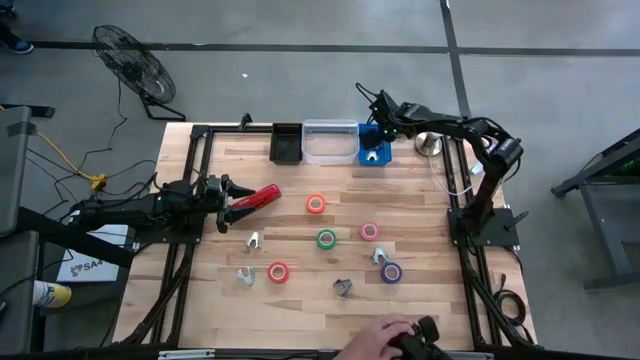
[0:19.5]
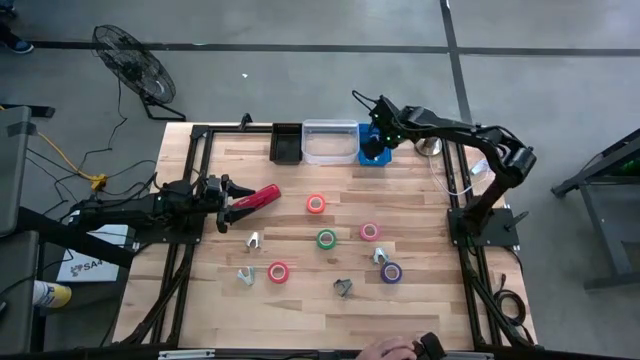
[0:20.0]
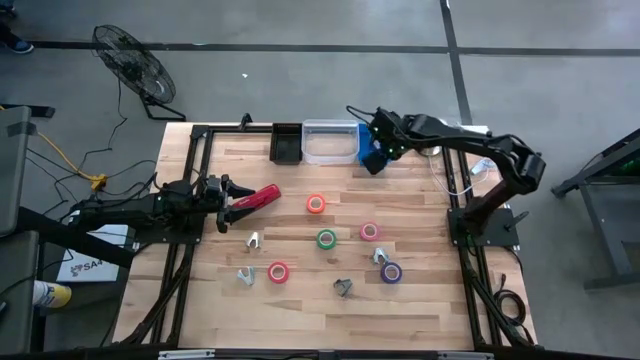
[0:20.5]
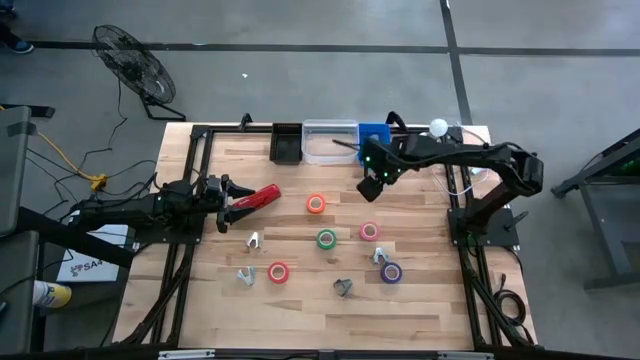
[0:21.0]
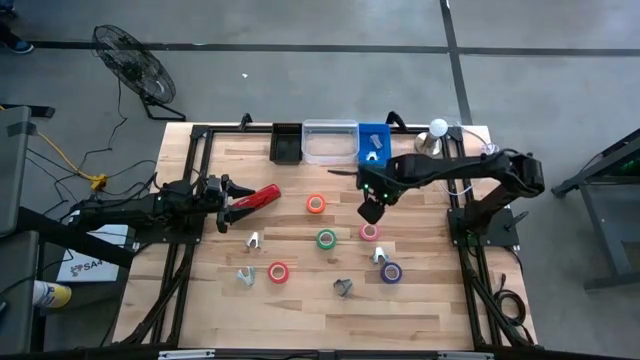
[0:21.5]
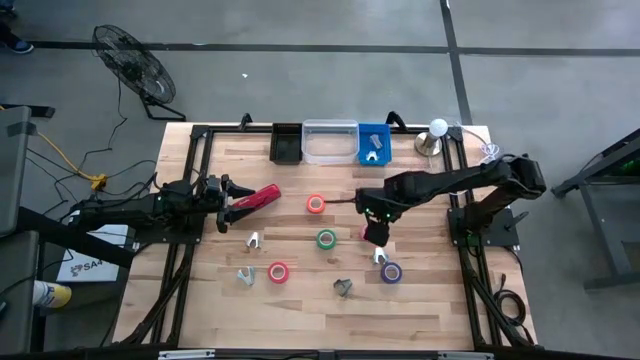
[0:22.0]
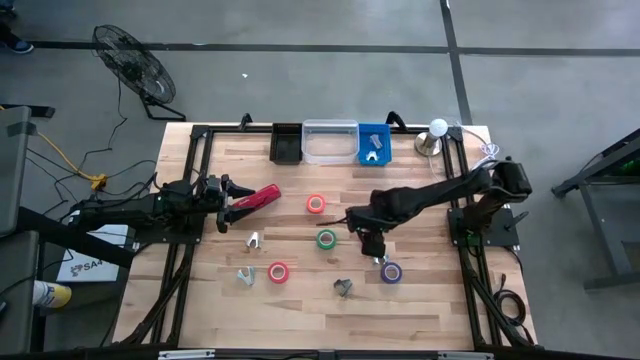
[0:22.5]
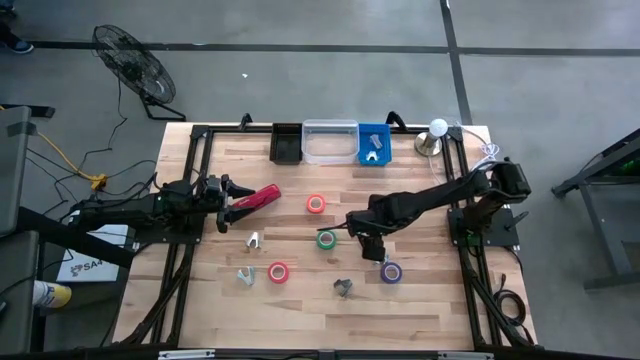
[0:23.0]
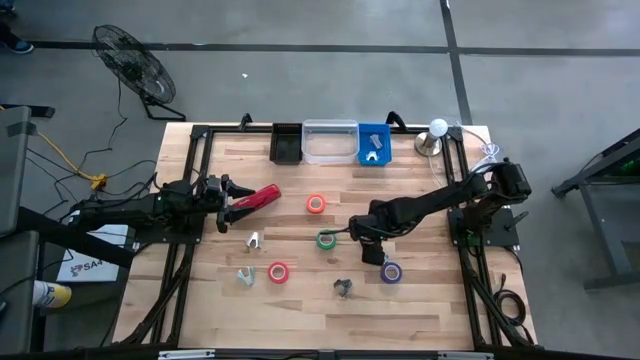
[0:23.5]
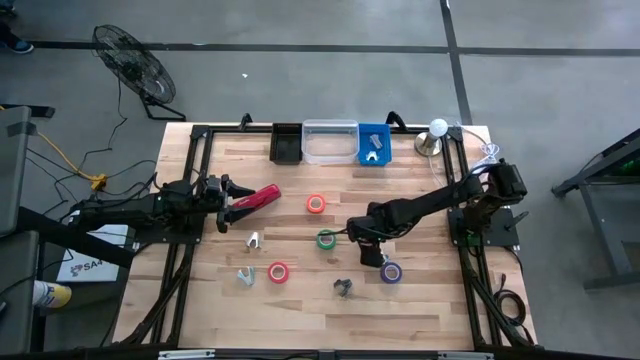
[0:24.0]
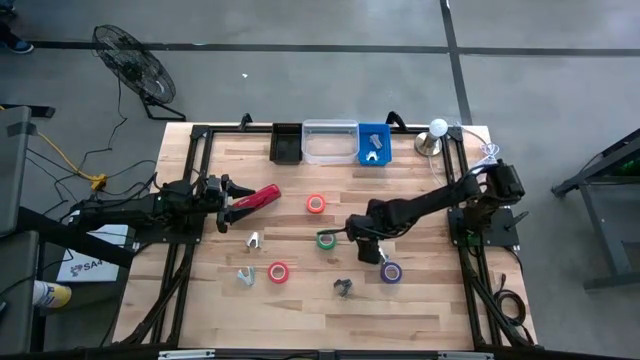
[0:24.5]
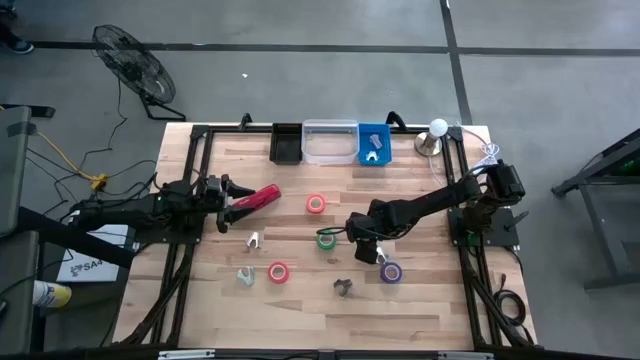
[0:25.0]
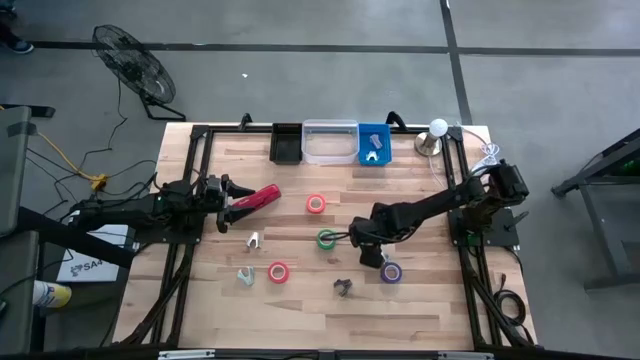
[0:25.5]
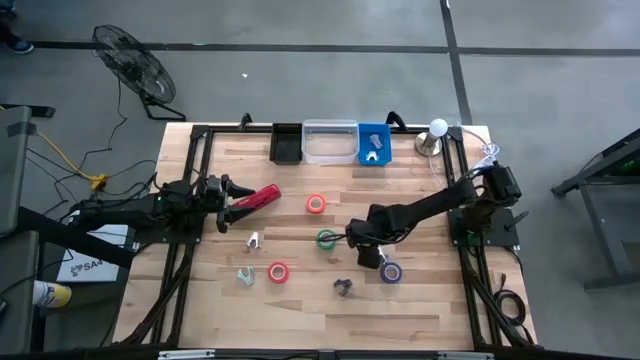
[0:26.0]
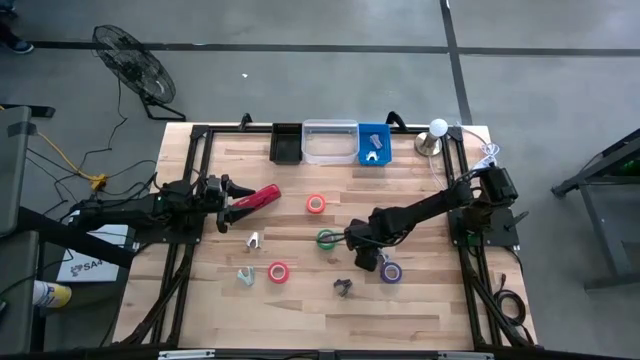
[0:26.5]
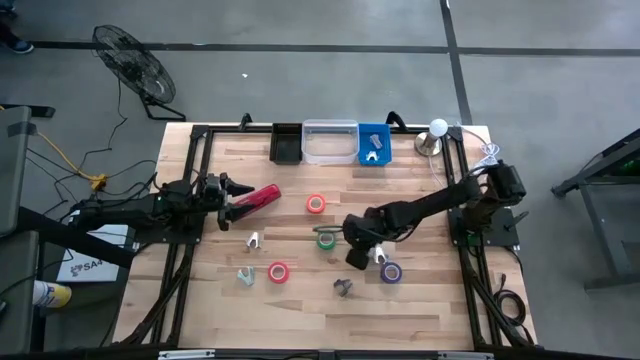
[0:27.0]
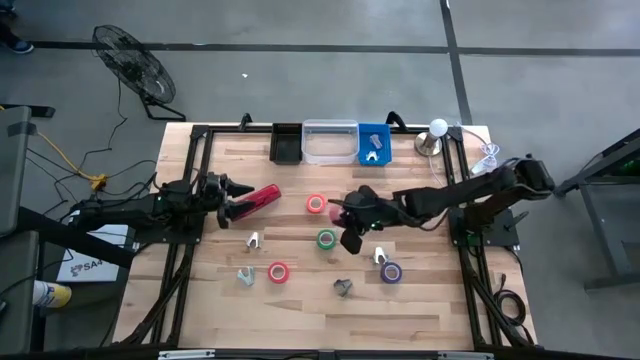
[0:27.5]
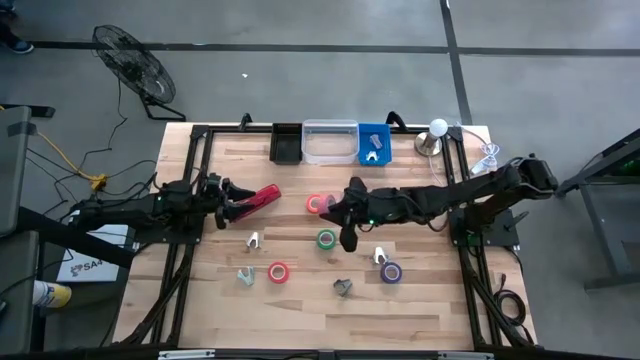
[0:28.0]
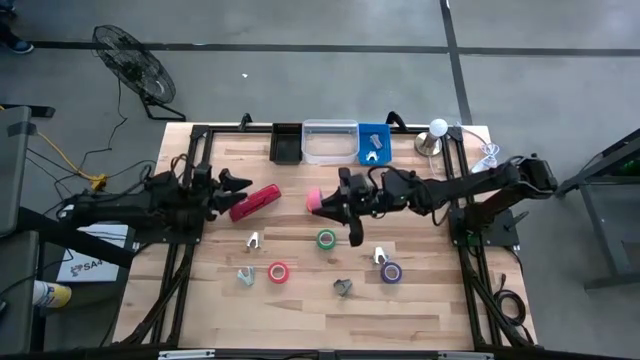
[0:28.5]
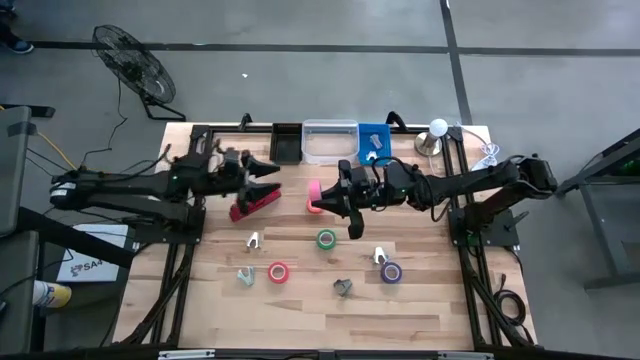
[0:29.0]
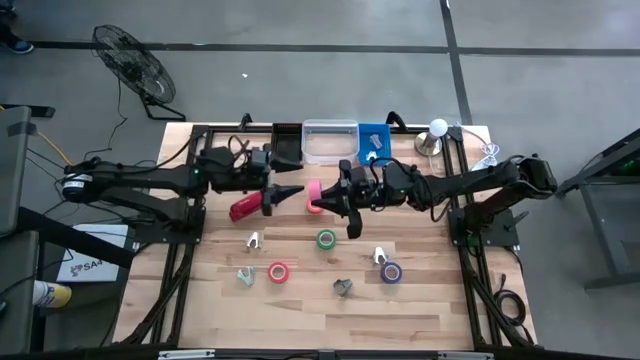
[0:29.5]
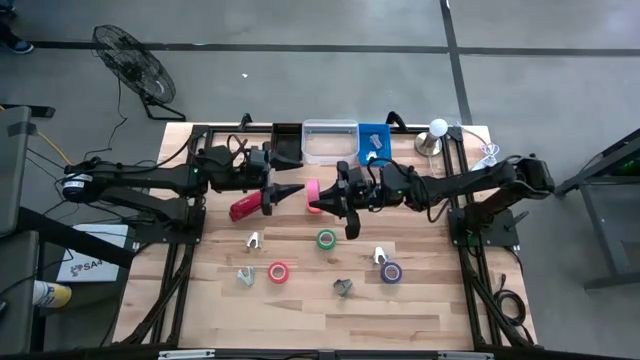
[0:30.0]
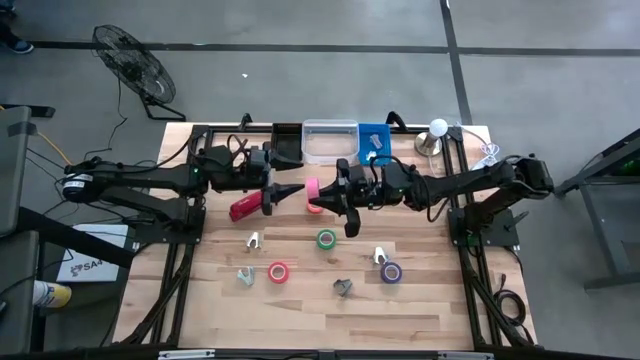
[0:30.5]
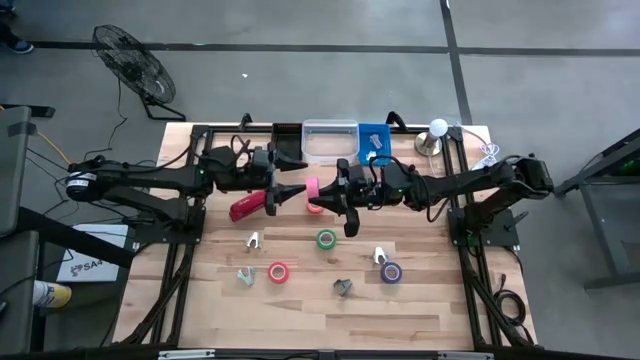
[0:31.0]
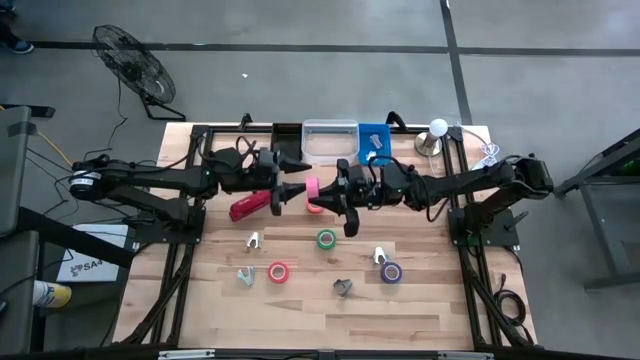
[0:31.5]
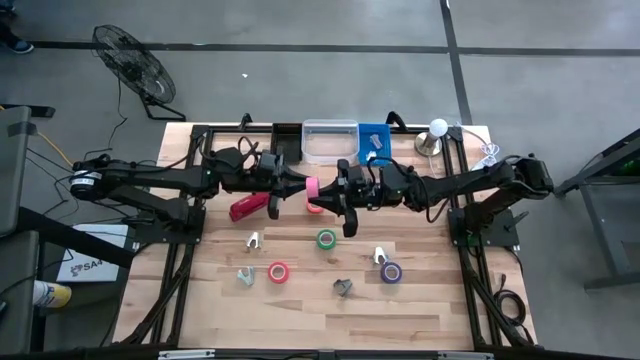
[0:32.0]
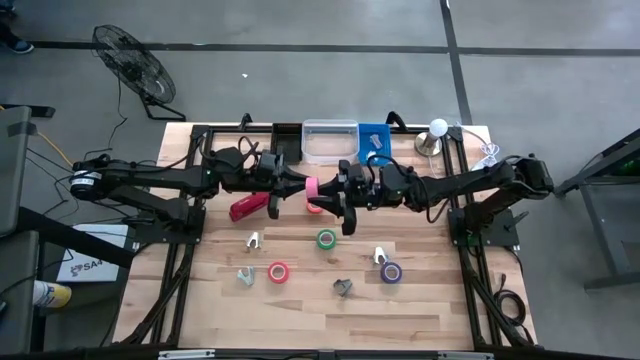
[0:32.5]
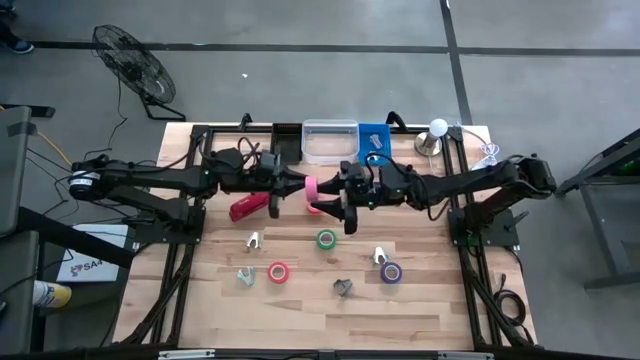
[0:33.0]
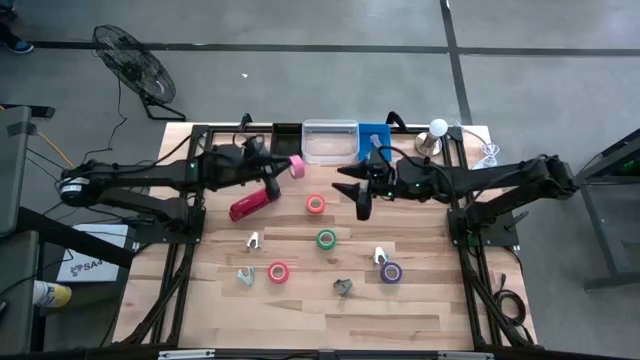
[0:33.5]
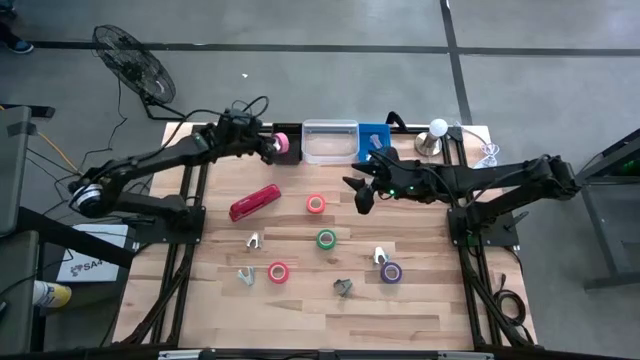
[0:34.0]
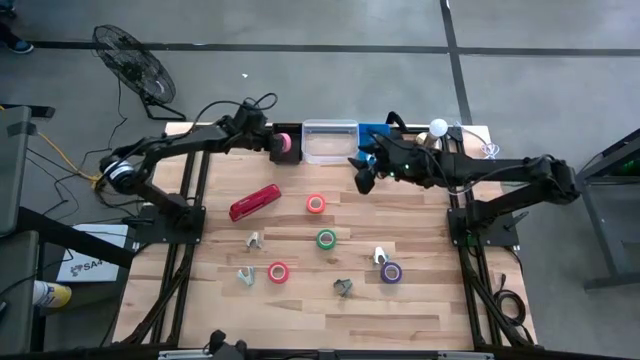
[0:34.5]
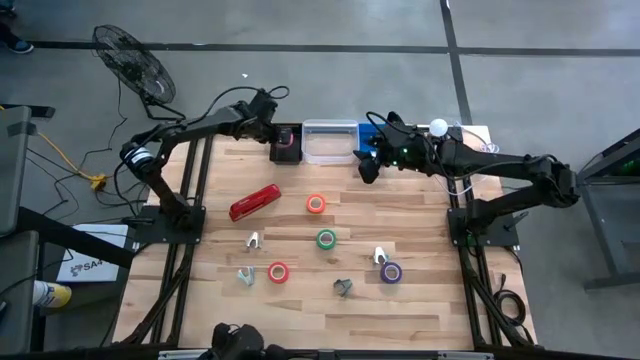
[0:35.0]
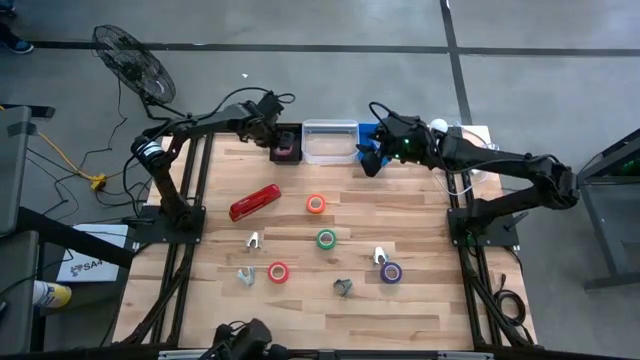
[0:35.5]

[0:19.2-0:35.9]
Task: Pick and place Stapler, Stapler remover, tape
Put the pink tape into the black bin

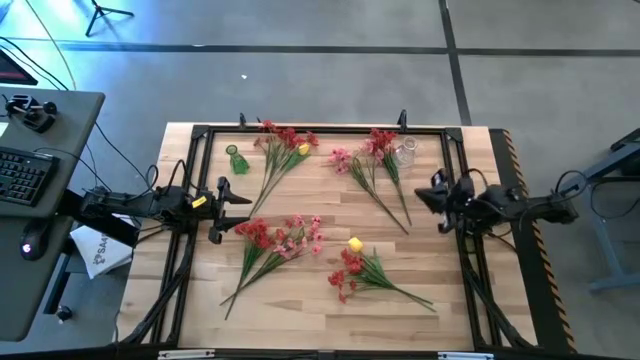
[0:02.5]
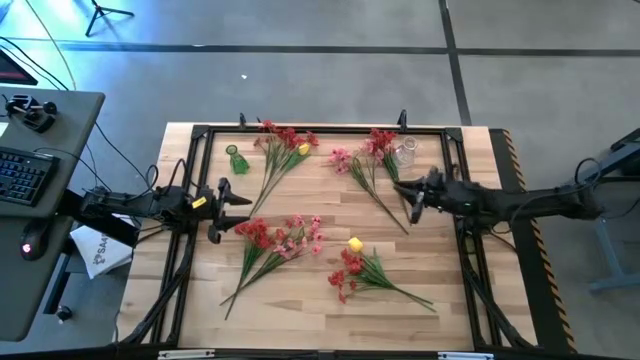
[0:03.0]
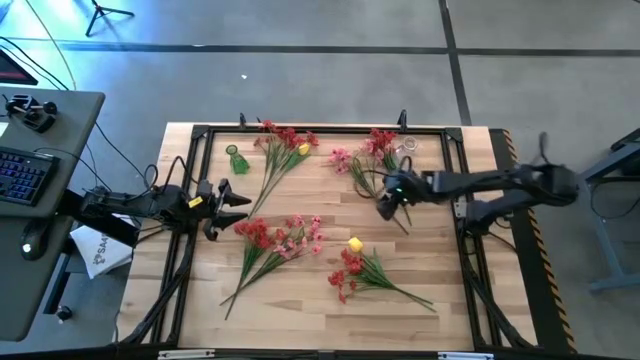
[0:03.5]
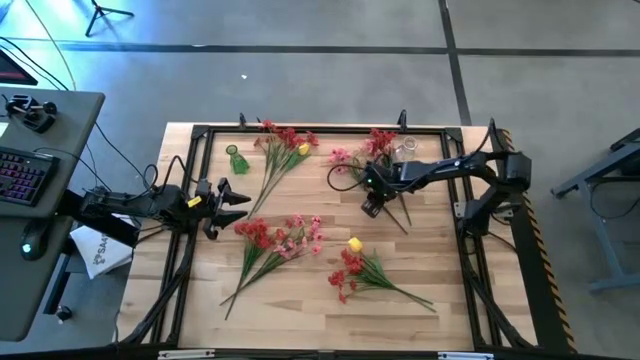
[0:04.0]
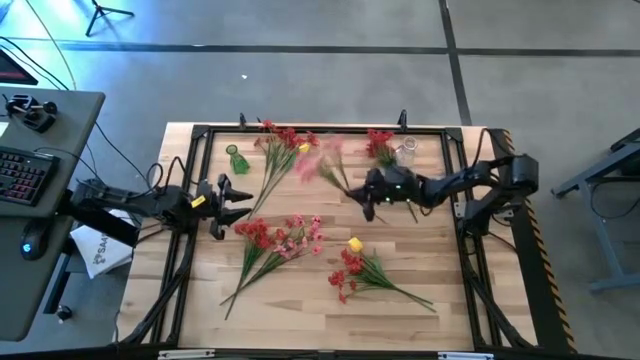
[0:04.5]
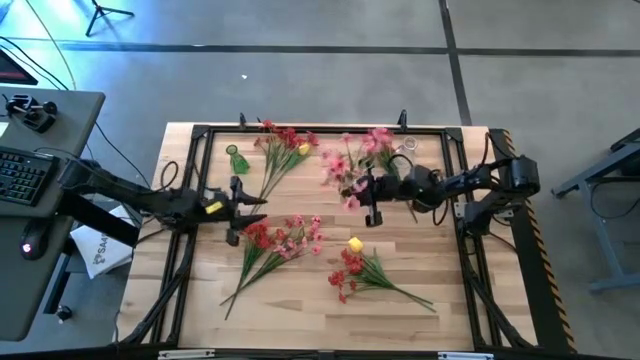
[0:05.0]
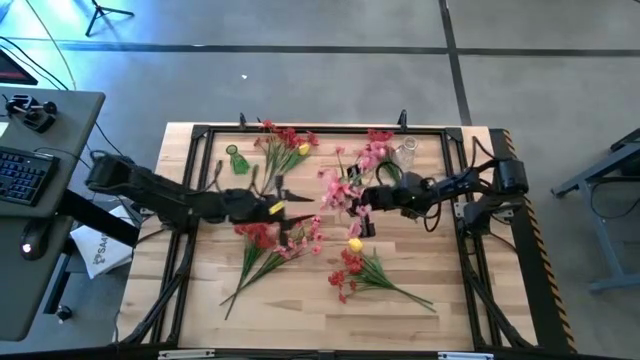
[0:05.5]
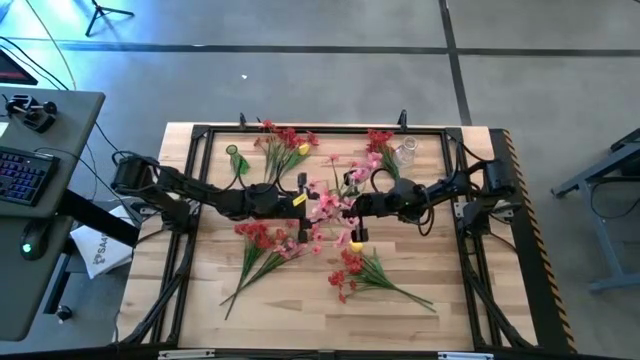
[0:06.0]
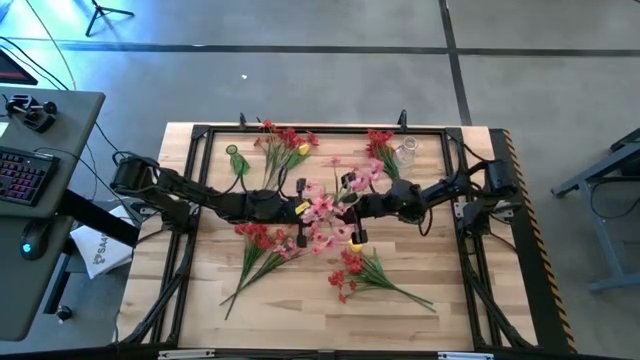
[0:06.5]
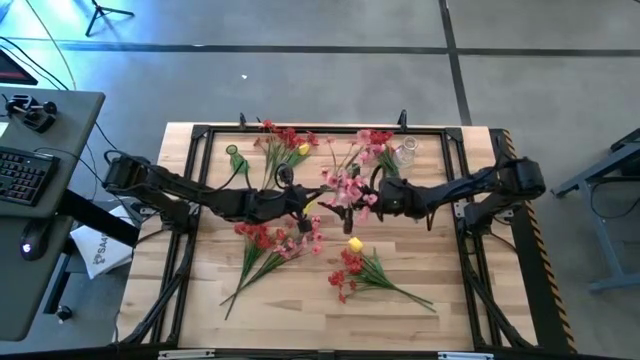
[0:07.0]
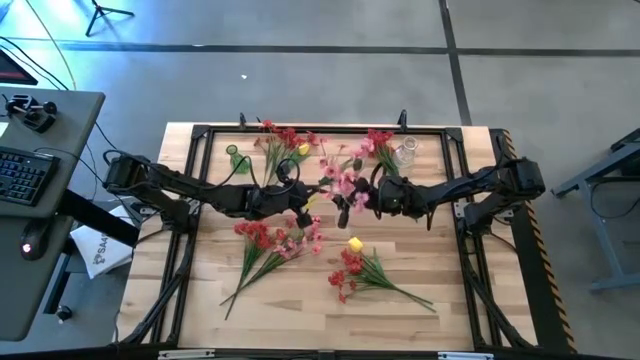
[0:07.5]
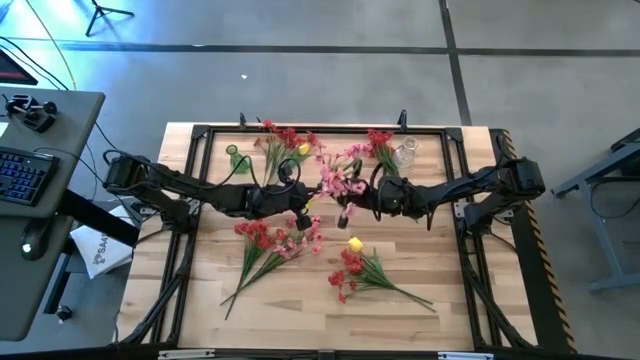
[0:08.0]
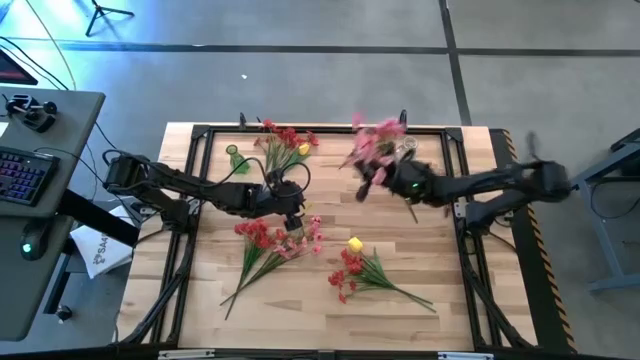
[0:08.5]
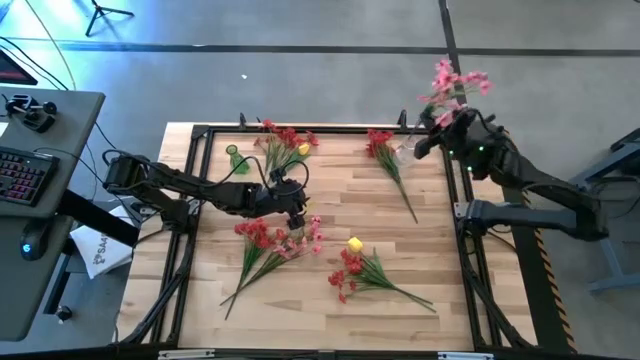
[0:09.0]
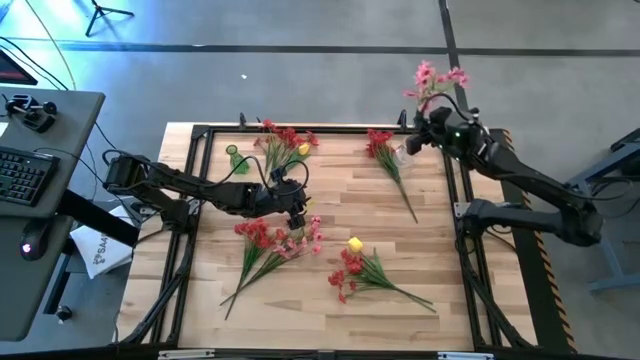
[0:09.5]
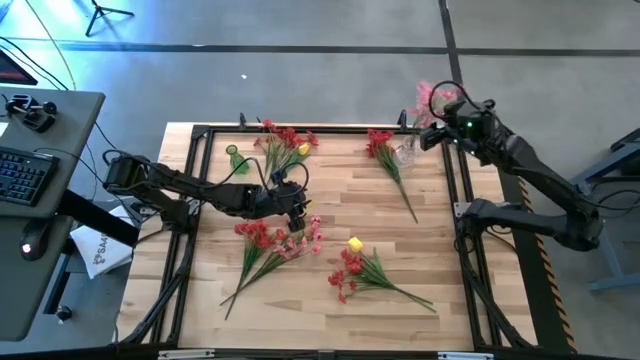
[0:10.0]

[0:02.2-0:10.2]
Task: Sort flowers into vase by color
Put the right pink flowers into the transparent vase
